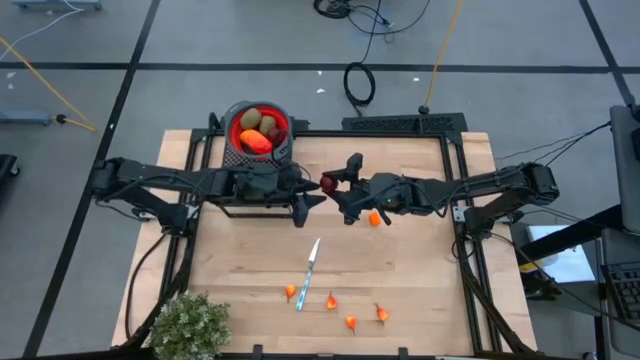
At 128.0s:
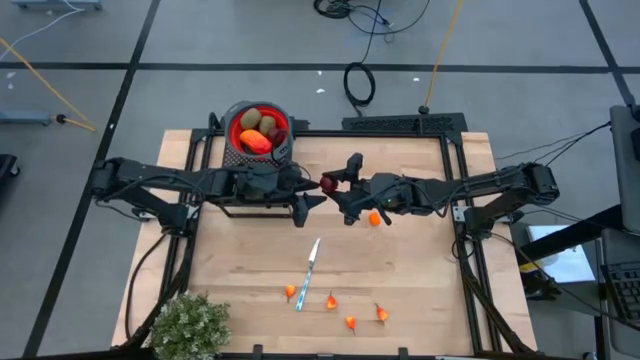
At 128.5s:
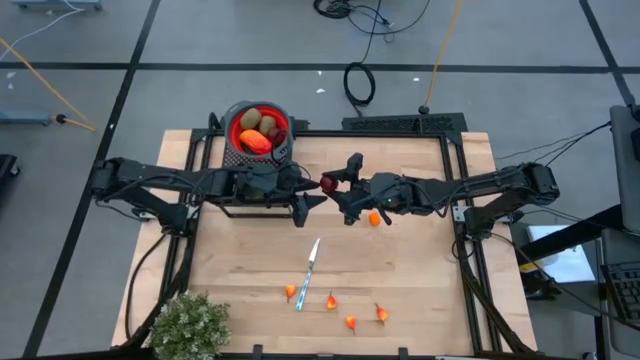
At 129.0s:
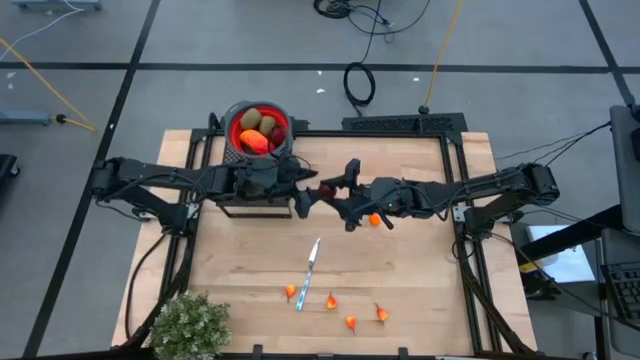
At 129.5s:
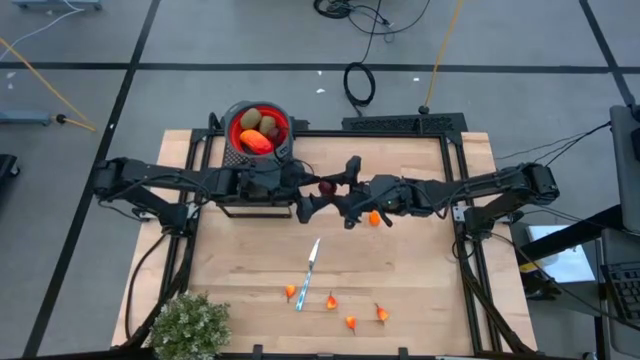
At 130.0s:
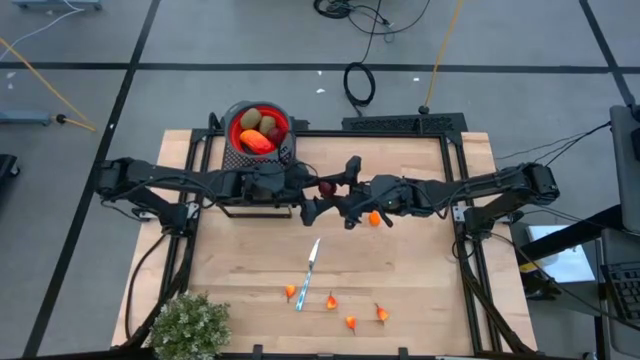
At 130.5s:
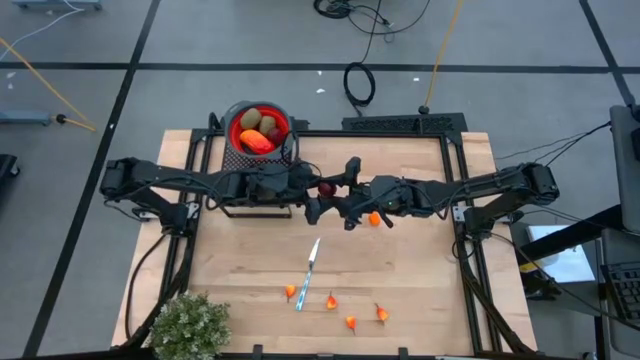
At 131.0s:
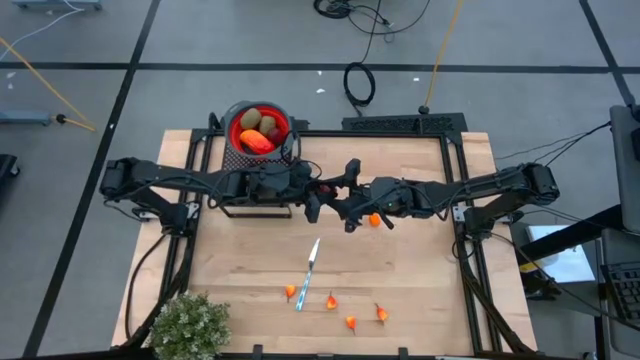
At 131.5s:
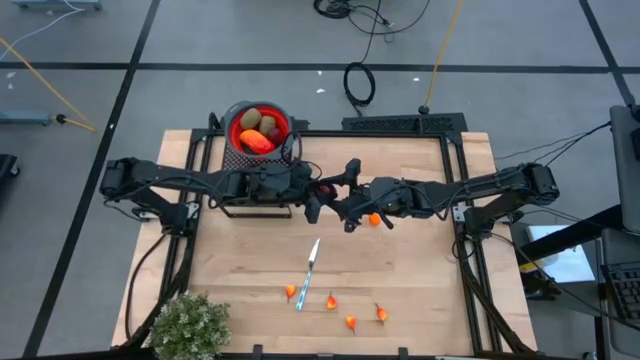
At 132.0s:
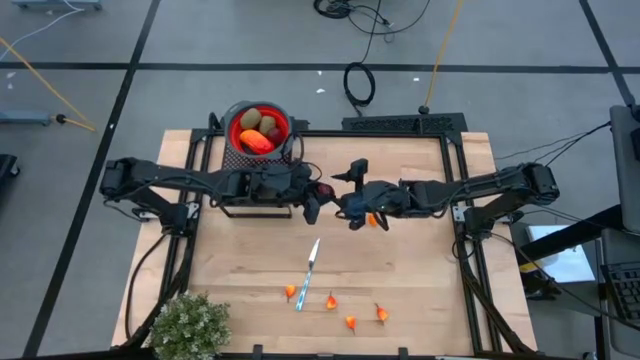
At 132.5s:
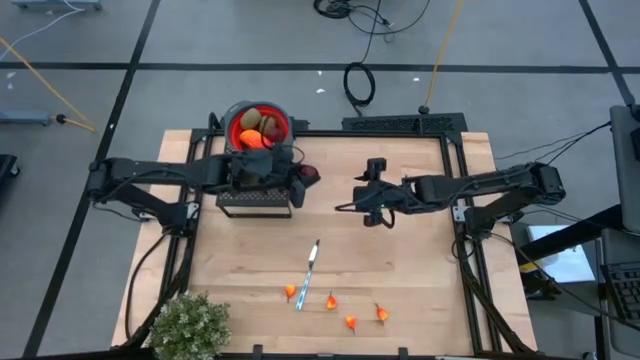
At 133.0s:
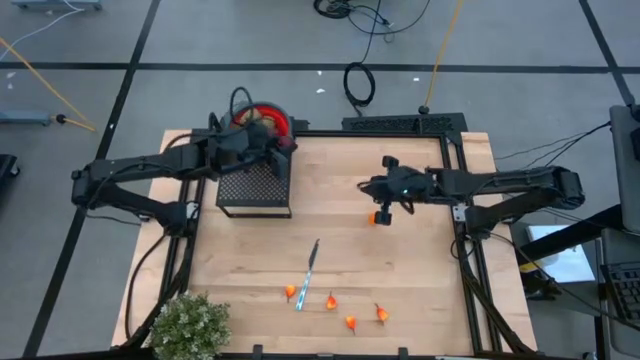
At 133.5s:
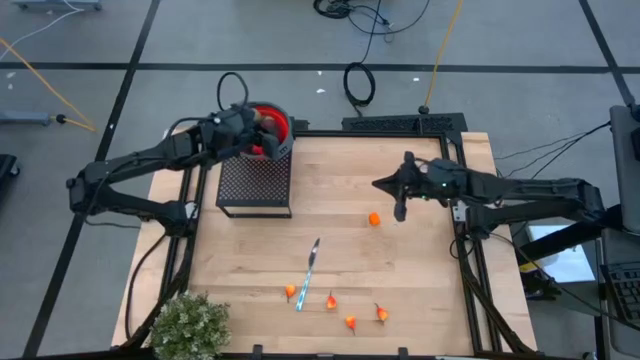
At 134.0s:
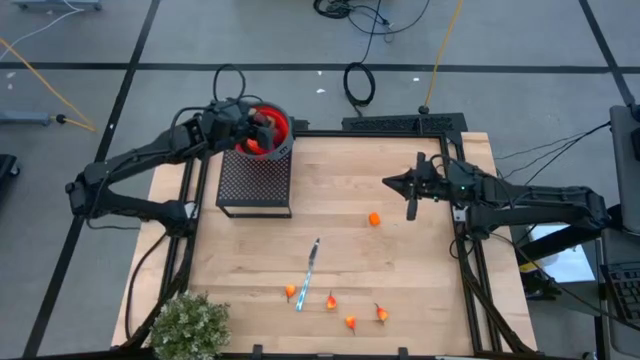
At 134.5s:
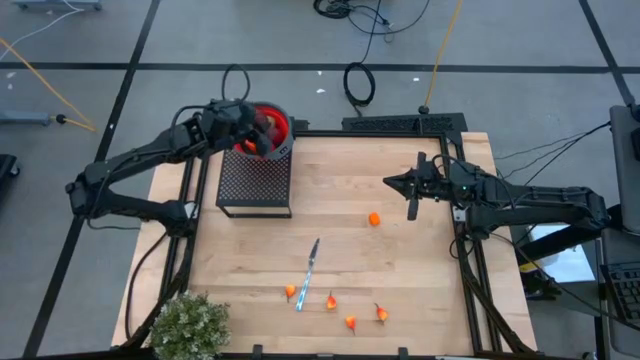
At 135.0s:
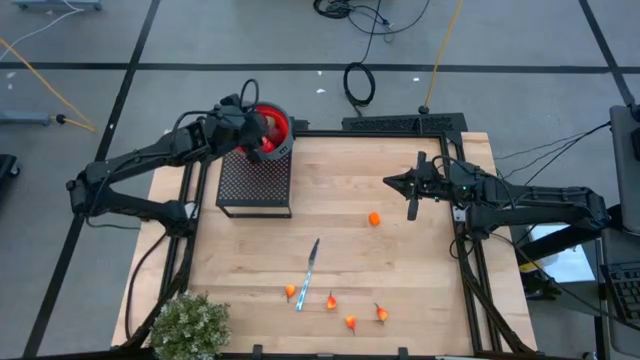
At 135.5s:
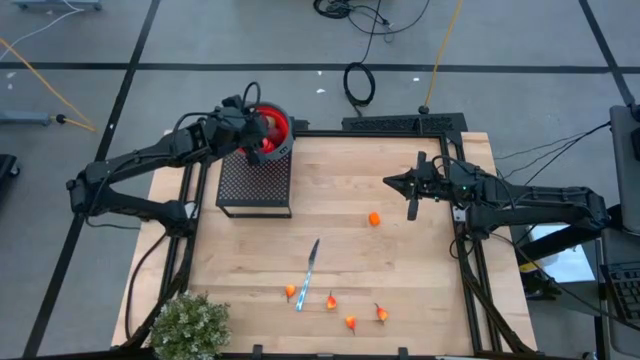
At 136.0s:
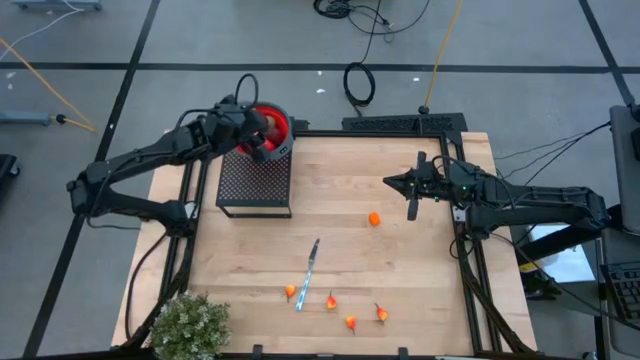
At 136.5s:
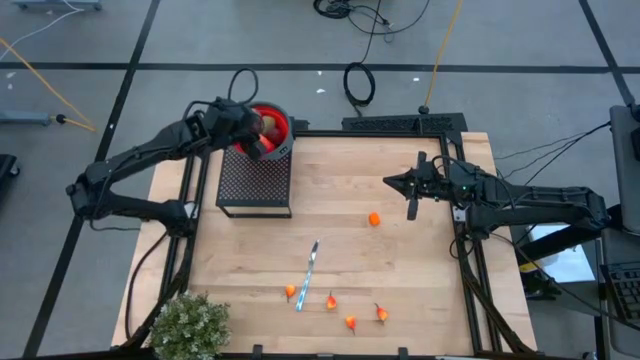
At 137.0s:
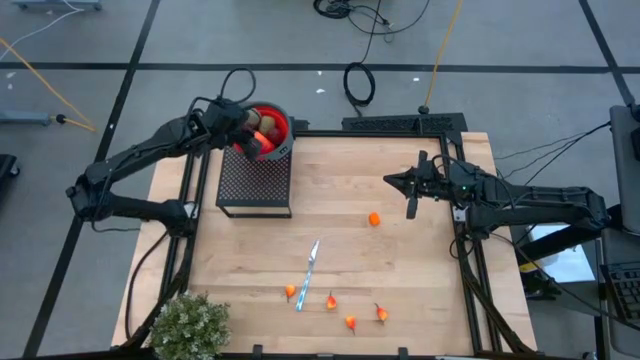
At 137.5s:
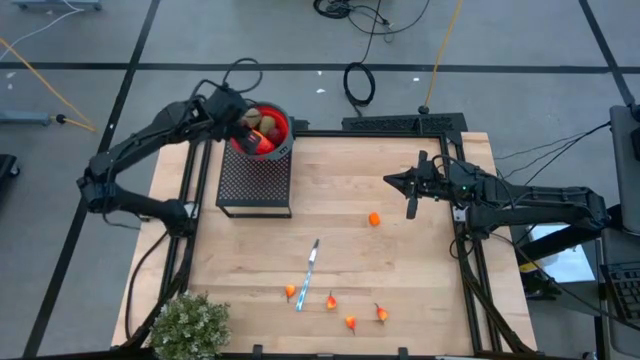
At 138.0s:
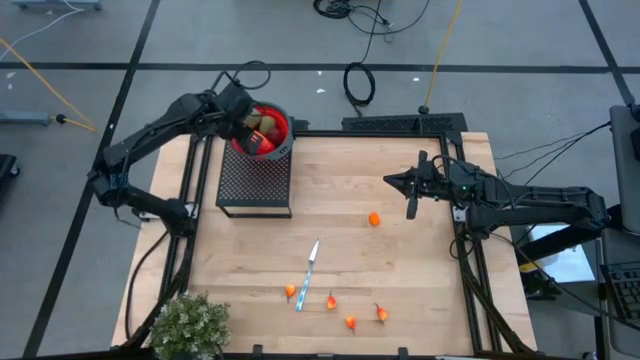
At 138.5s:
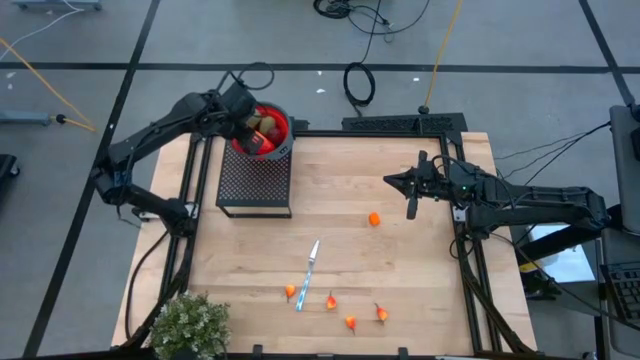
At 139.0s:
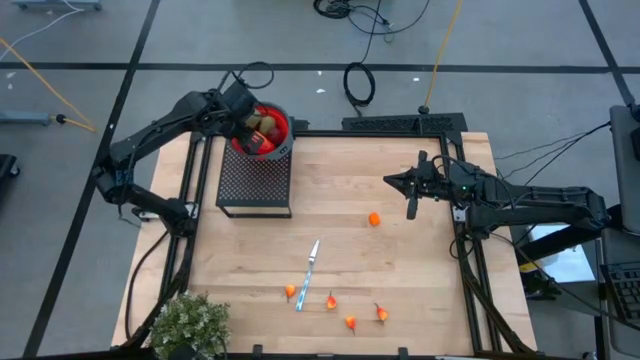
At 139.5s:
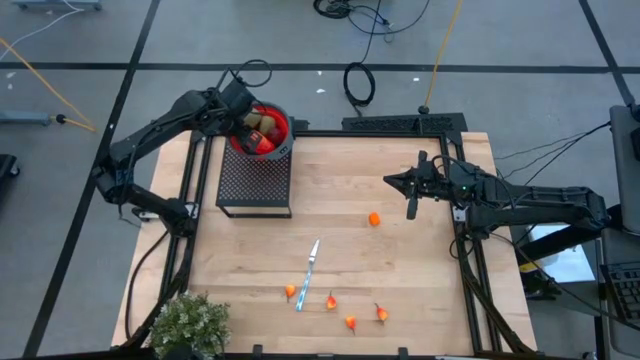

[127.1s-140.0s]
Task: Pick & Place Fruit
Put the red pomegranate into the red strainer bowl on the shelf

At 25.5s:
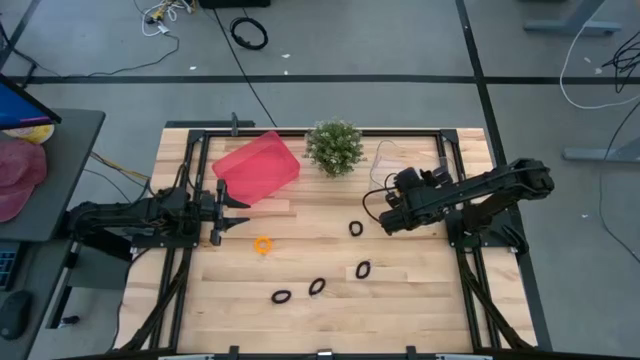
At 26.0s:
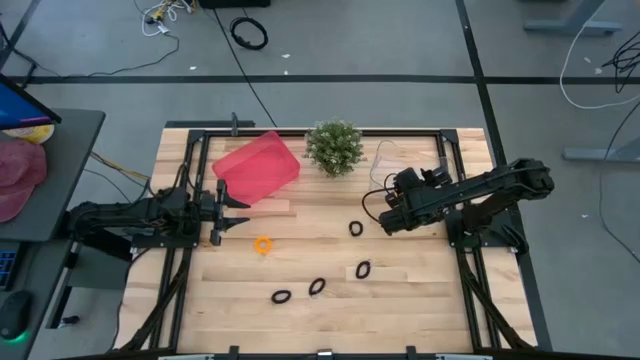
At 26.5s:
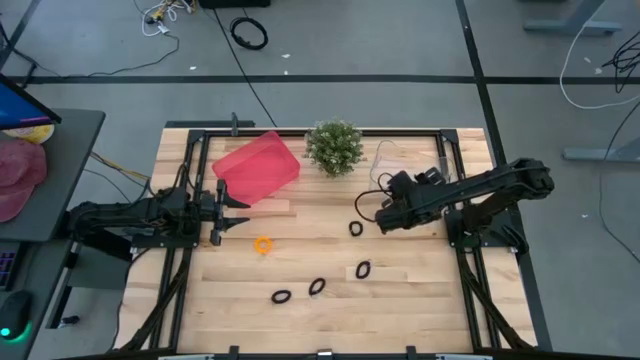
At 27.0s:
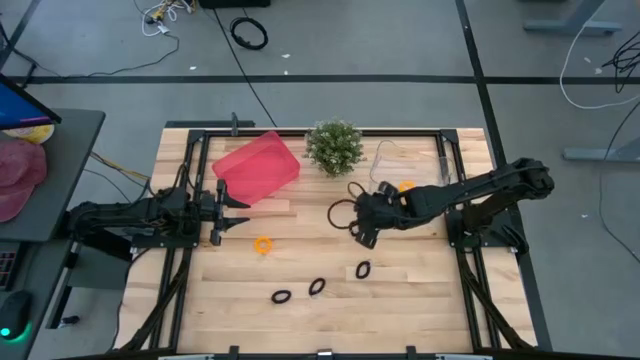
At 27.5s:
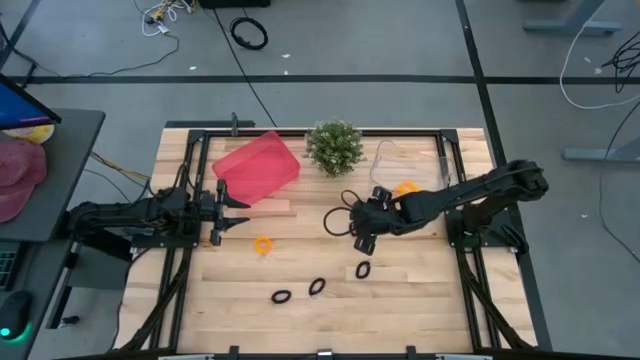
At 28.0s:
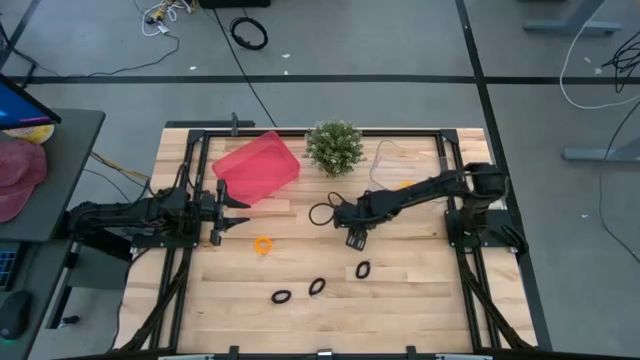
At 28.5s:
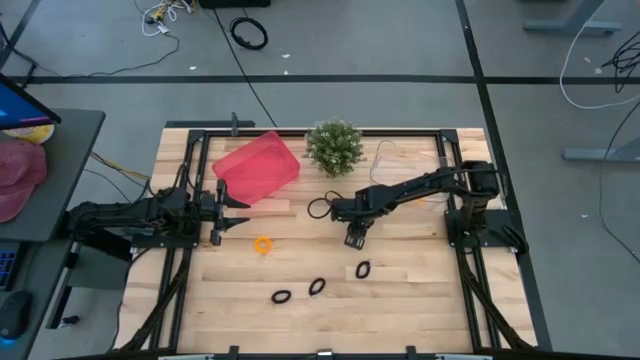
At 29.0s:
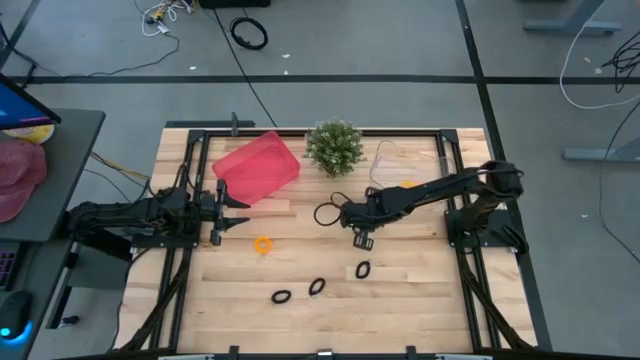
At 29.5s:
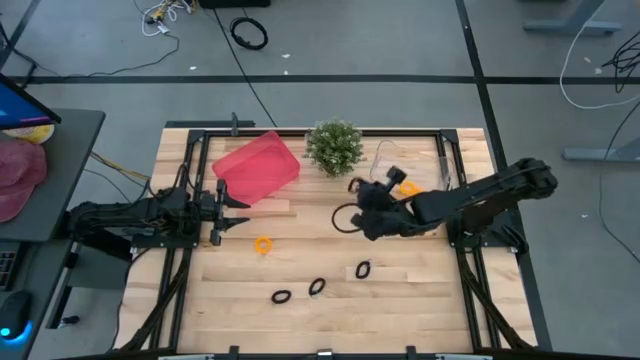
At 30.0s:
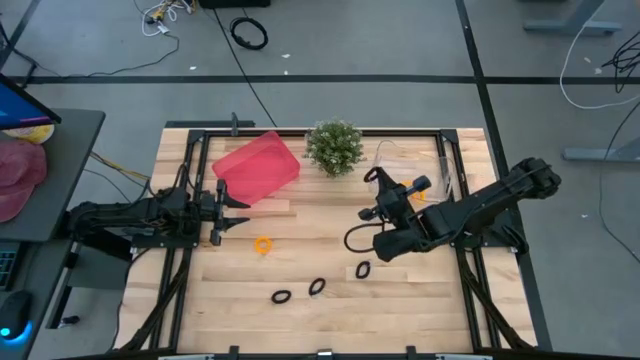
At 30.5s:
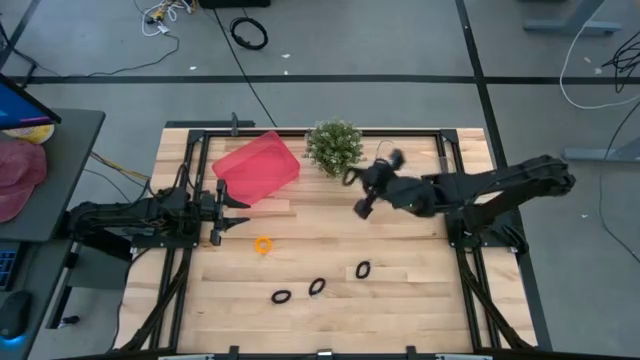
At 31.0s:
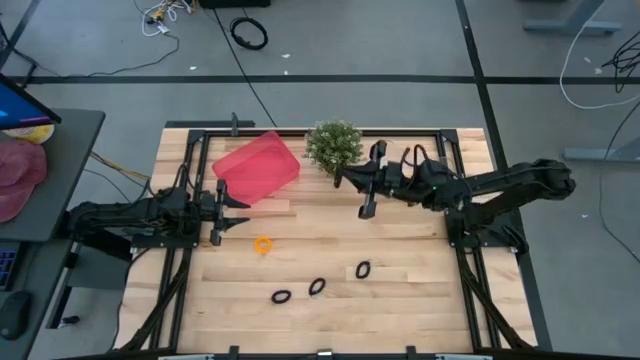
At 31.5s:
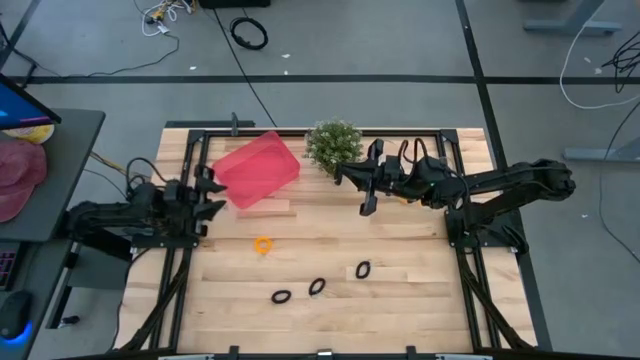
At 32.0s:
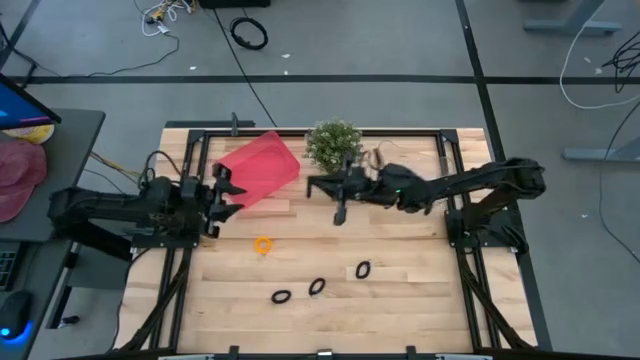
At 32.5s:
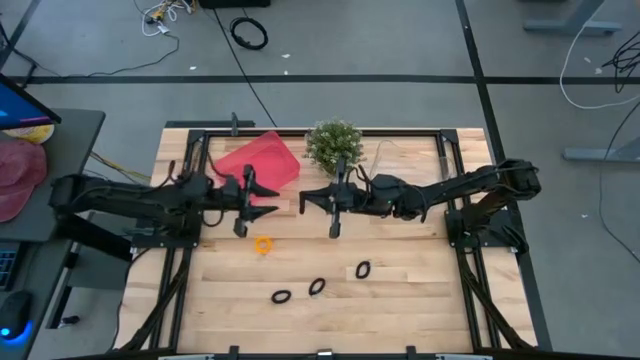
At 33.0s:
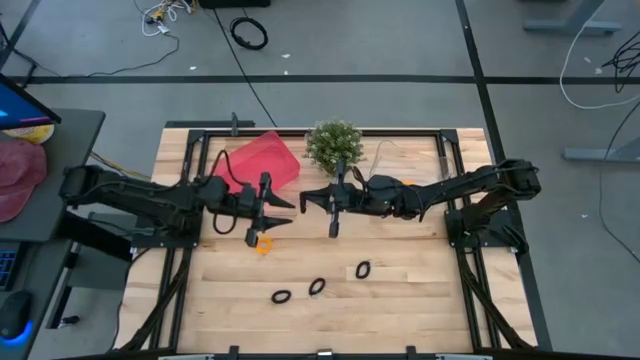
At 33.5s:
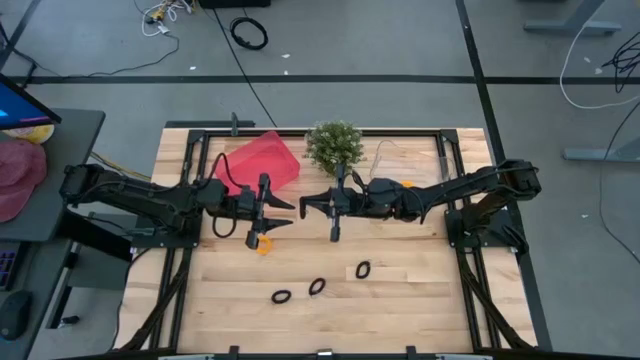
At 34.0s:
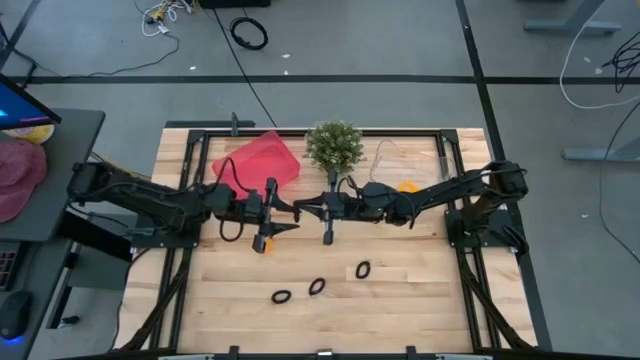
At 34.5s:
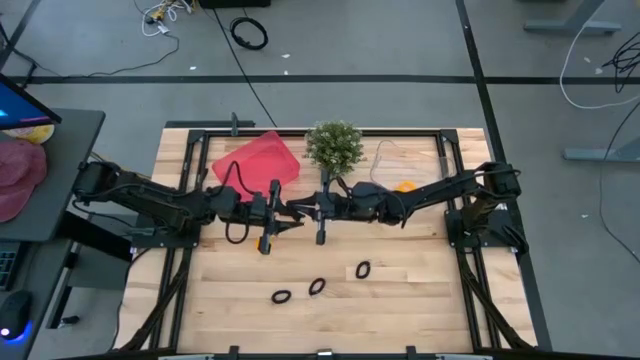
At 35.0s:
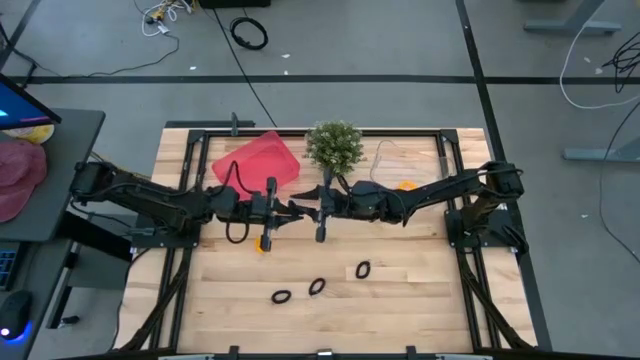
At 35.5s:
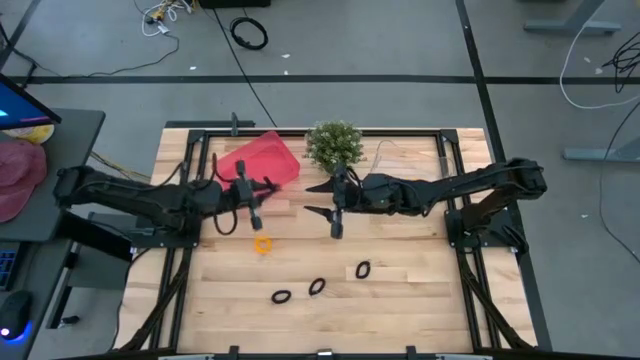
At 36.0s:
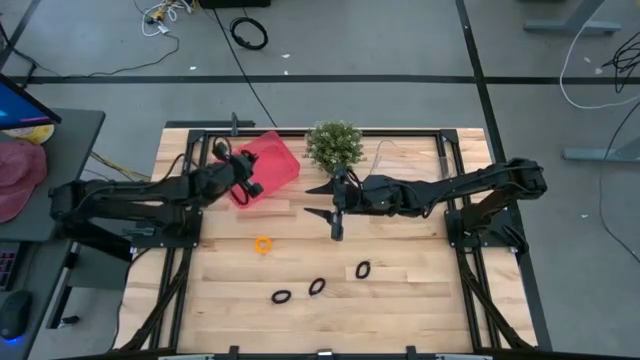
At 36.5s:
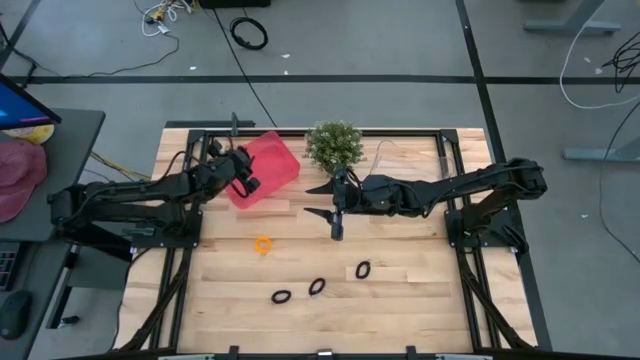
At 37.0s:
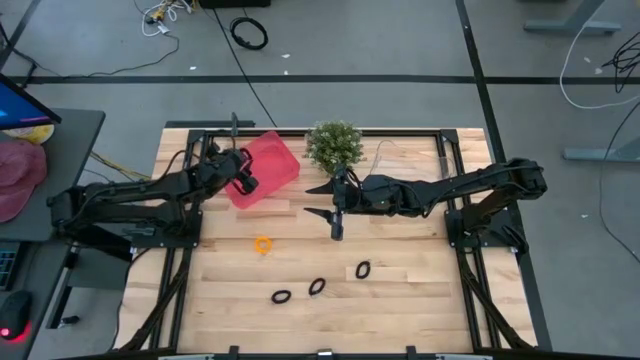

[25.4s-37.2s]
Task: Sort spring keychains
Put the top black spring keychain into the red bin
